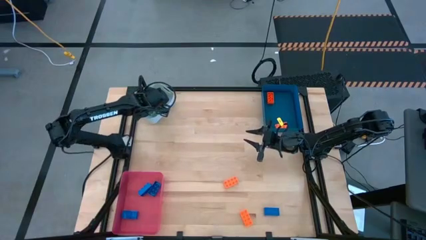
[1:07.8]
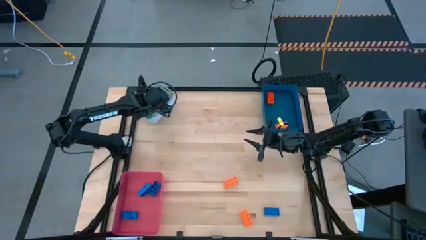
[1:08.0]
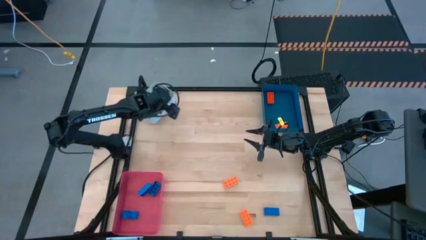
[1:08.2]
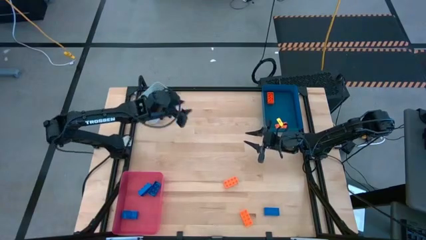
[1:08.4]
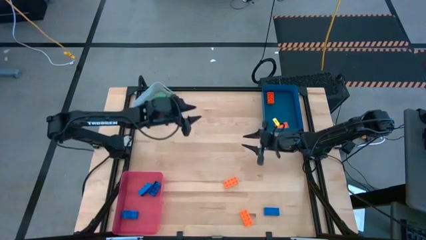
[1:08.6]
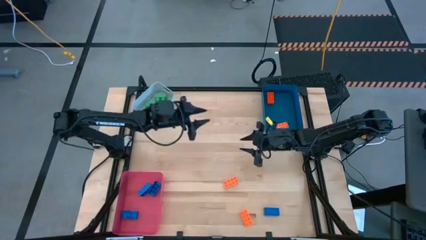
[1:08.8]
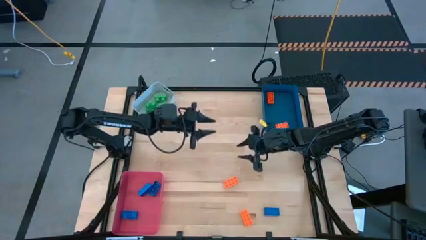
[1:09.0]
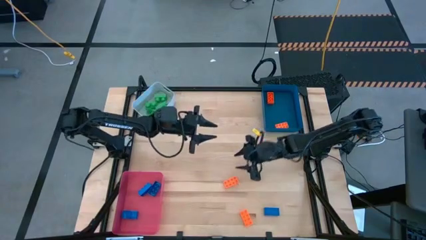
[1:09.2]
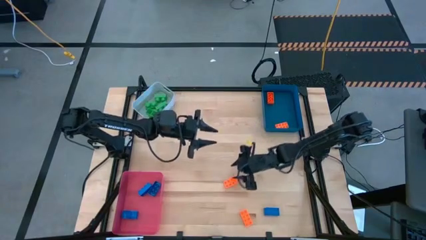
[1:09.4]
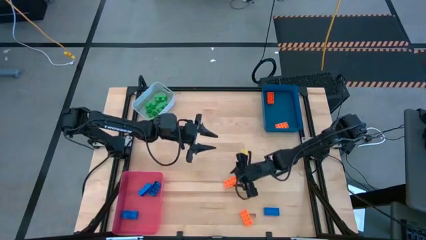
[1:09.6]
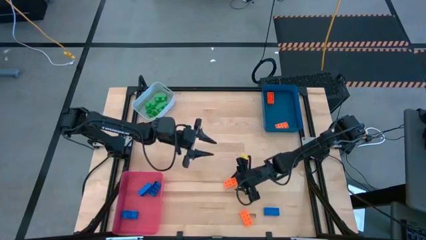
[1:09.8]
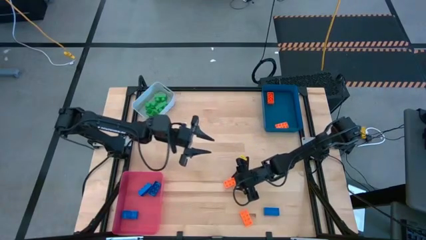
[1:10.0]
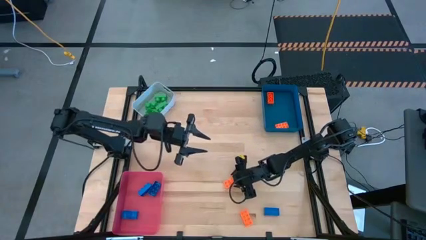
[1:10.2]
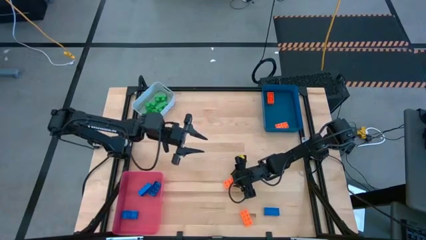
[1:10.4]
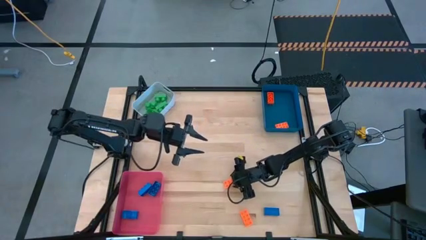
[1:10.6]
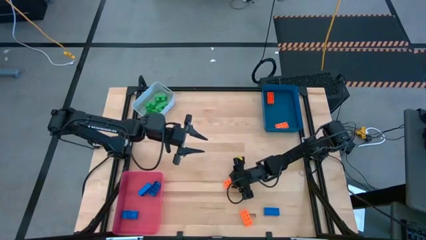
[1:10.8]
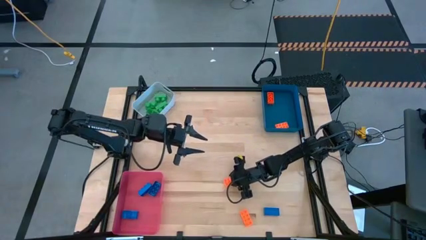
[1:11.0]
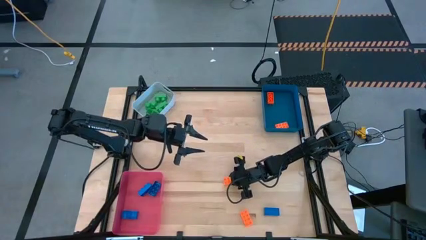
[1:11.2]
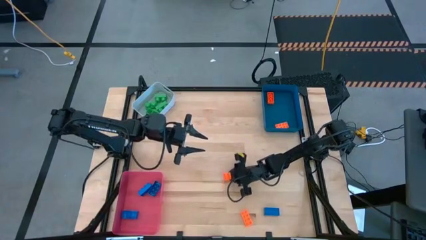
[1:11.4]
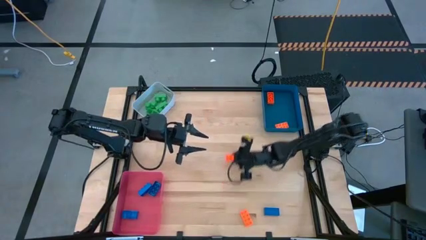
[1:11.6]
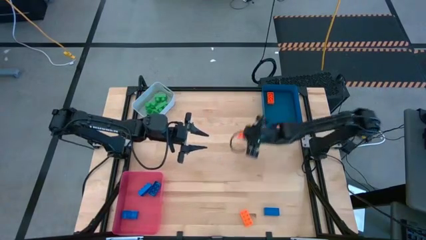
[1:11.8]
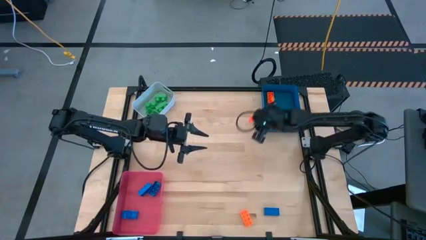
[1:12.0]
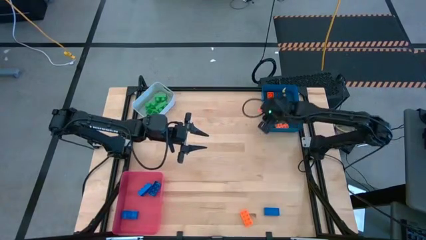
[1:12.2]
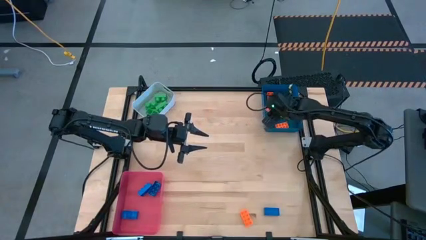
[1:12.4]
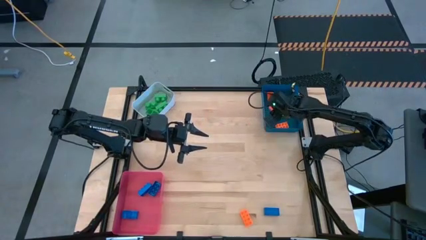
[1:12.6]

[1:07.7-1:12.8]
Task: Sort & place blocks by color
Put the orange game piece into the blue bin

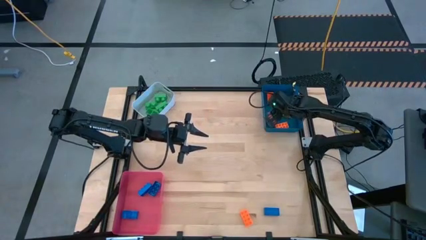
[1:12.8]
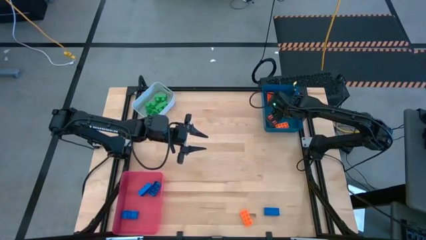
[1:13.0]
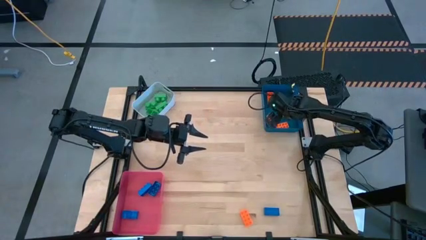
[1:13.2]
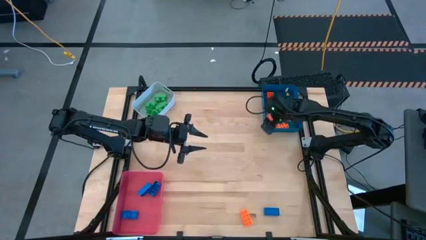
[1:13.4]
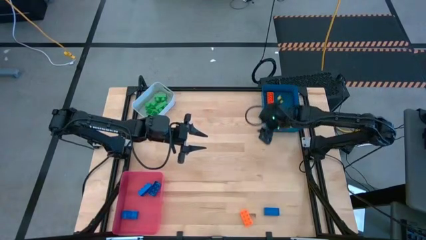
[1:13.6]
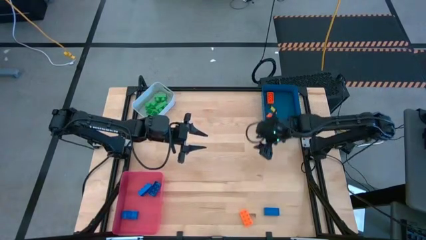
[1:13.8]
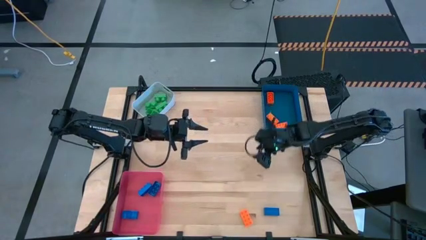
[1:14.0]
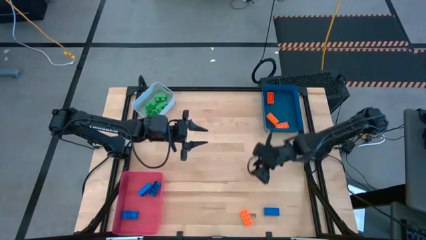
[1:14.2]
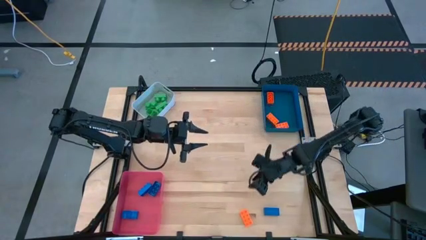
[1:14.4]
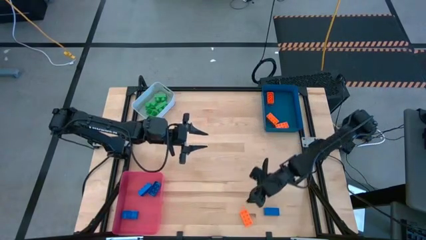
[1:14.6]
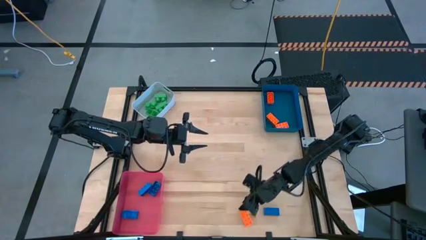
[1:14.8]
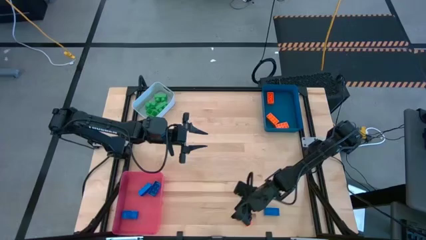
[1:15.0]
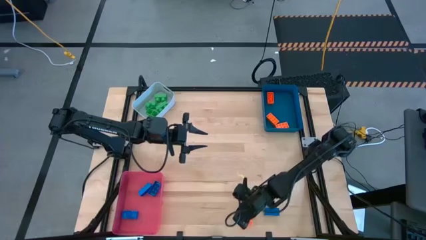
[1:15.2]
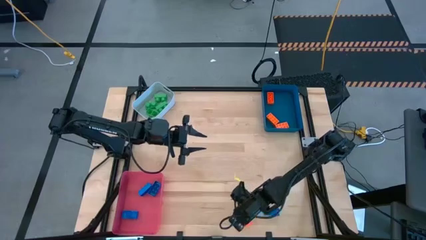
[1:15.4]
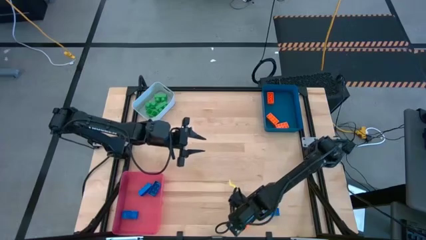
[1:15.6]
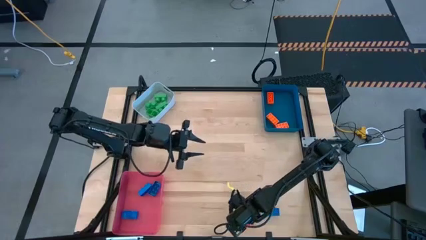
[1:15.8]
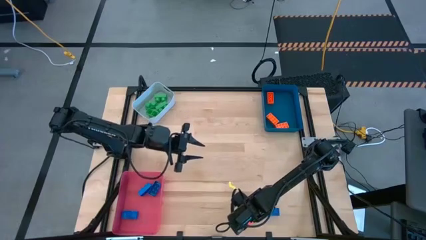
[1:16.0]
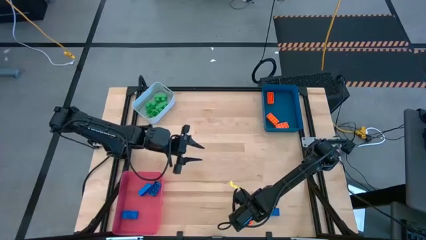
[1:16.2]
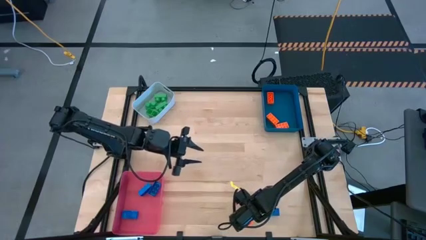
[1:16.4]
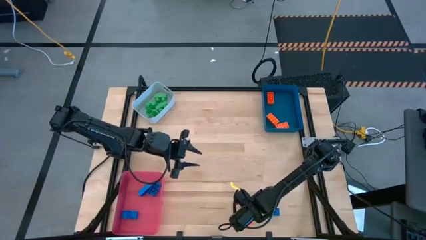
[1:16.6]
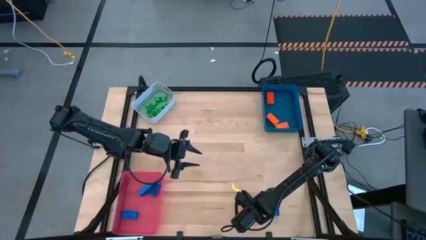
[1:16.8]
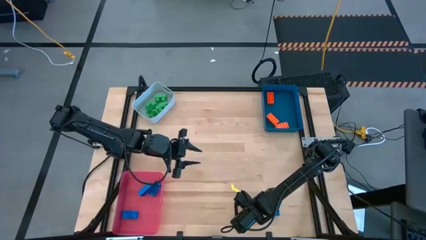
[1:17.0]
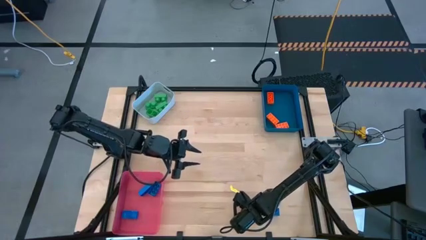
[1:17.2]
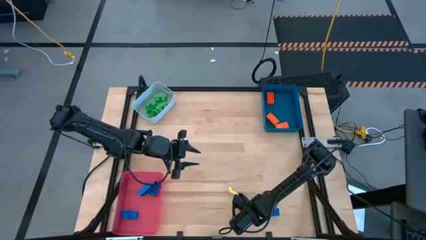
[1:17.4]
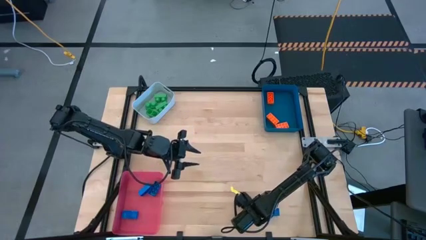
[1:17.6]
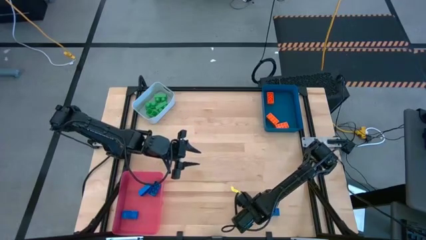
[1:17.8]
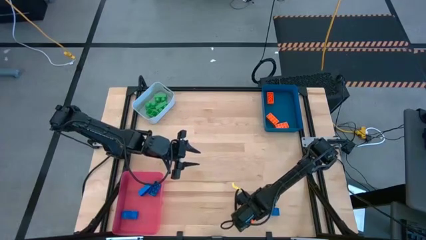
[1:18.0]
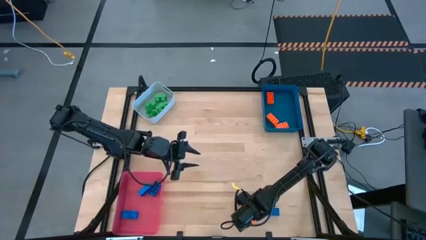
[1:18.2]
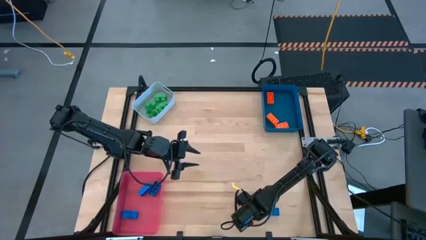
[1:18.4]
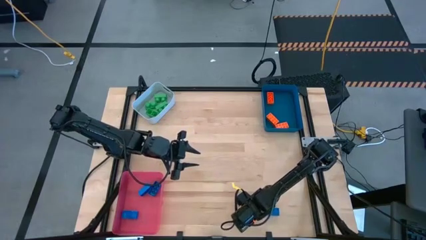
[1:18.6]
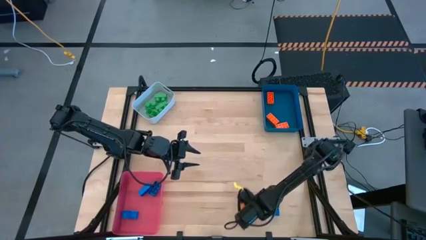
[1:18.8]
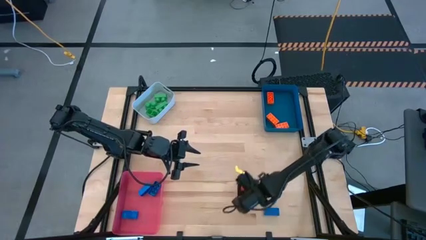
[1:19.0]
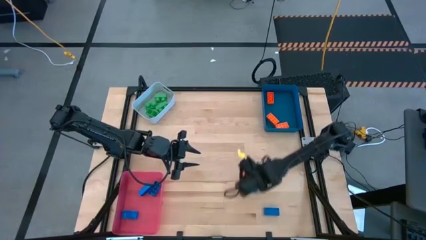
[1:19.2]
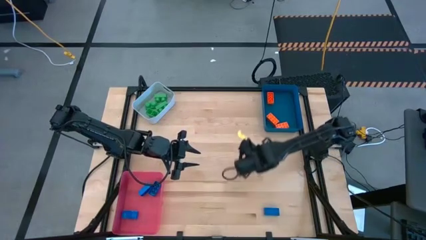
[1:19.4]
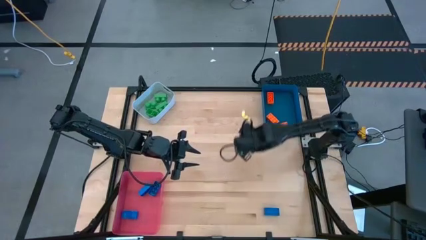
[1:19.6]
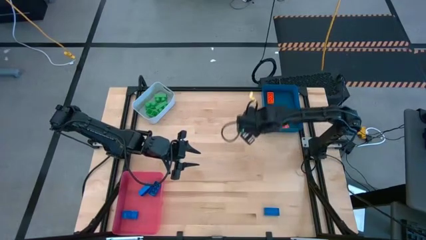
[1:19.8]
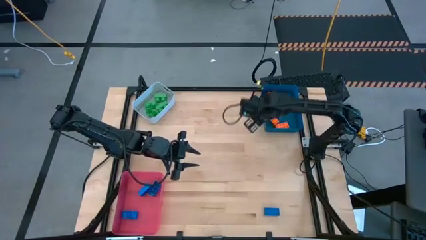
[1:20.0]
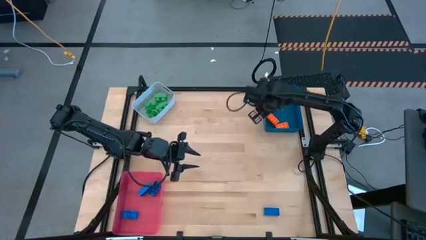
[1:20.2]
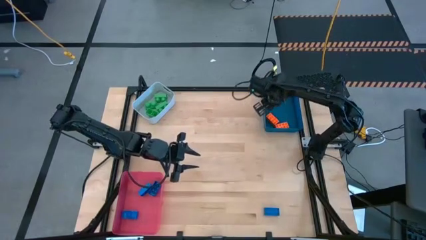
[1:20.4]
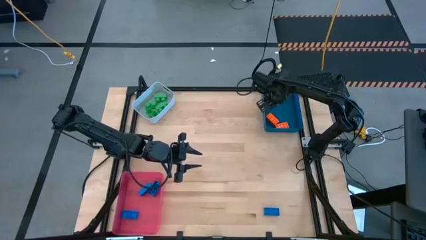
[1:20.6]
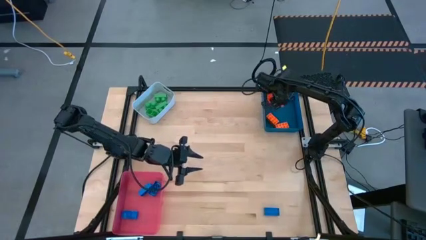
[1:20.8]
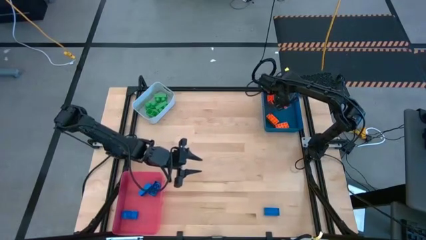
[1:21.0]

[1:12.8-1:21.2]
Put the orange game piece into the blue bin

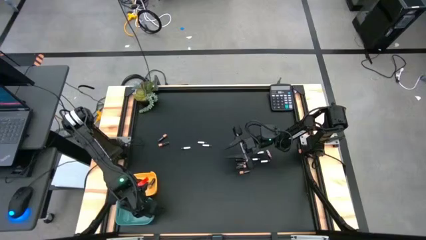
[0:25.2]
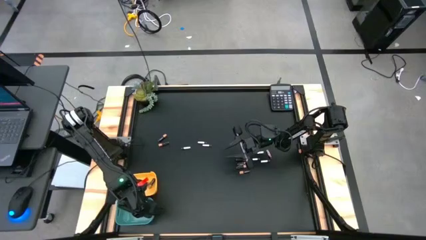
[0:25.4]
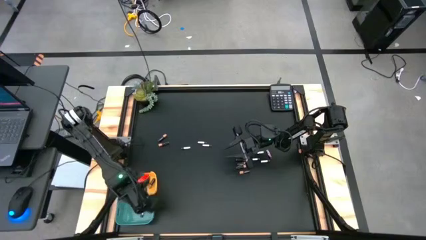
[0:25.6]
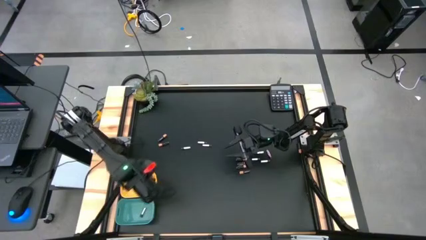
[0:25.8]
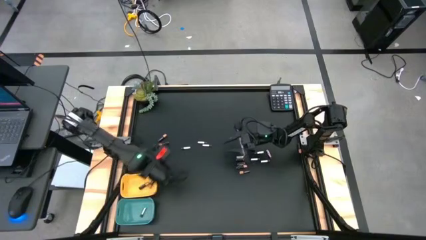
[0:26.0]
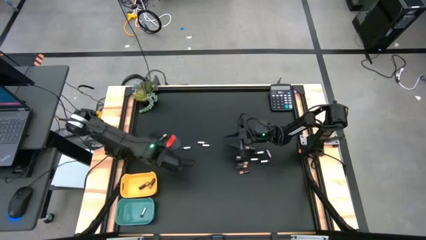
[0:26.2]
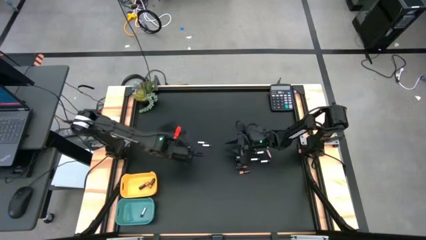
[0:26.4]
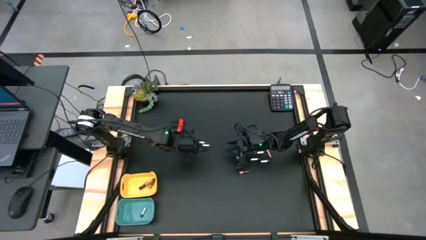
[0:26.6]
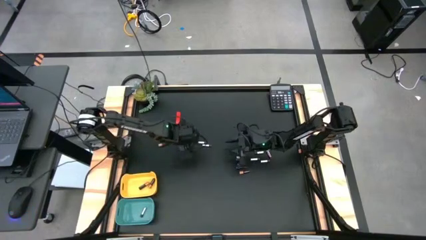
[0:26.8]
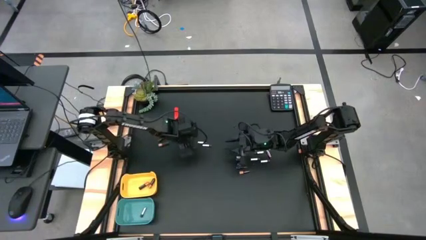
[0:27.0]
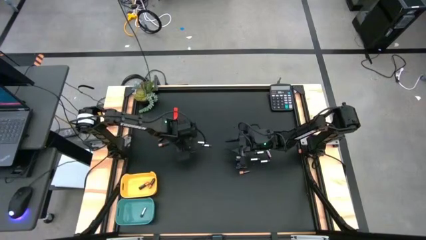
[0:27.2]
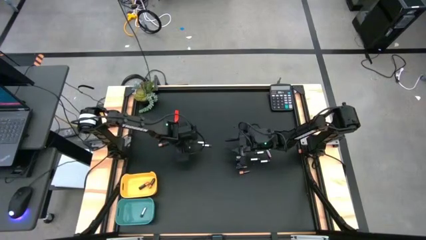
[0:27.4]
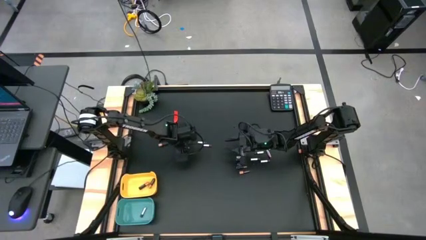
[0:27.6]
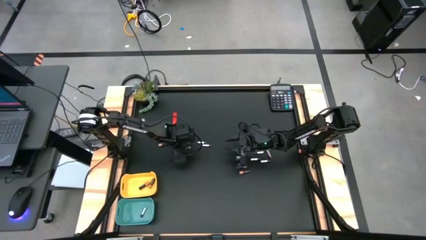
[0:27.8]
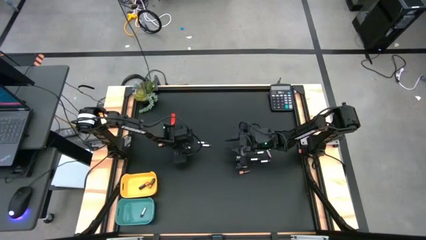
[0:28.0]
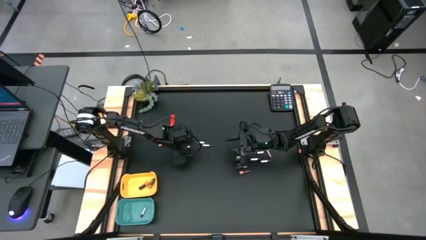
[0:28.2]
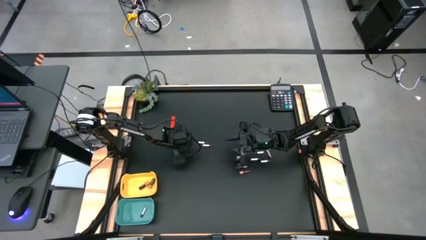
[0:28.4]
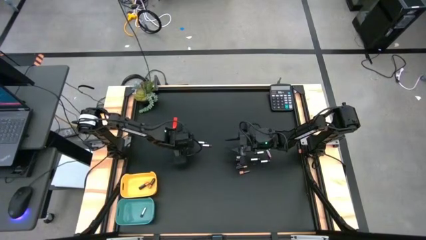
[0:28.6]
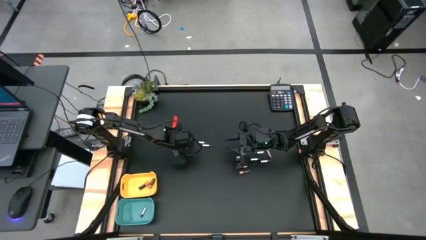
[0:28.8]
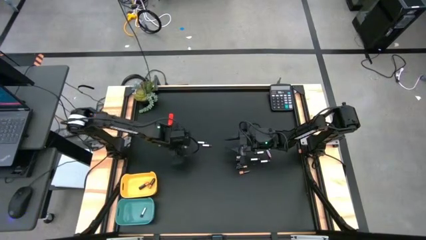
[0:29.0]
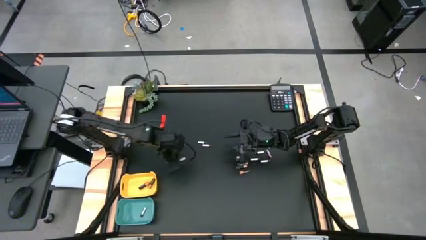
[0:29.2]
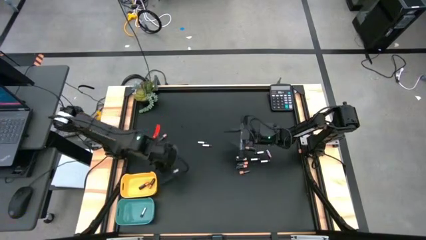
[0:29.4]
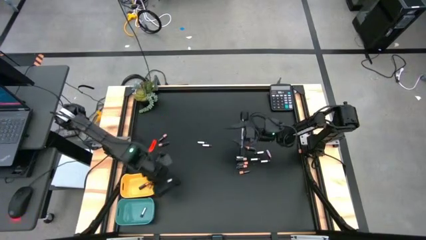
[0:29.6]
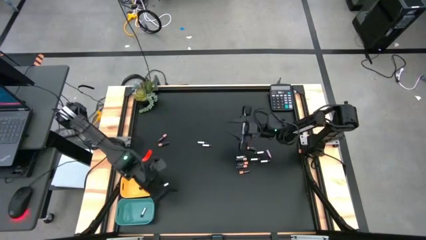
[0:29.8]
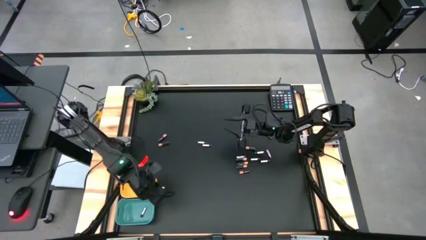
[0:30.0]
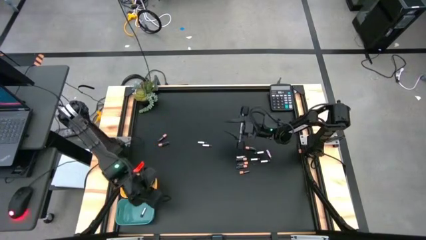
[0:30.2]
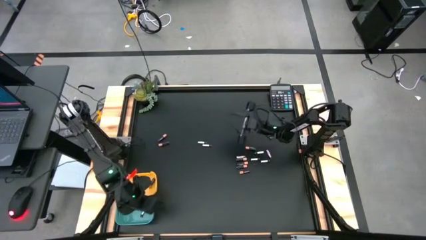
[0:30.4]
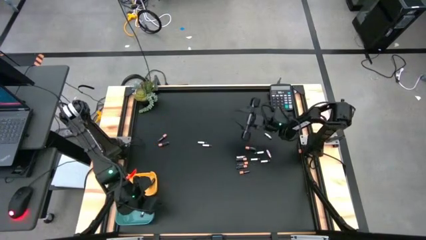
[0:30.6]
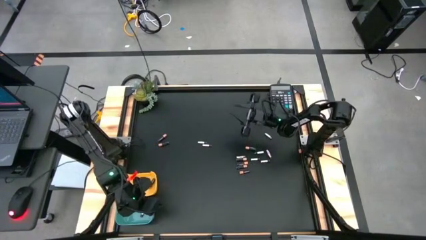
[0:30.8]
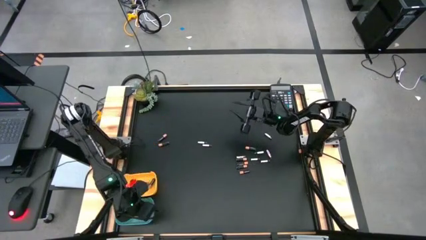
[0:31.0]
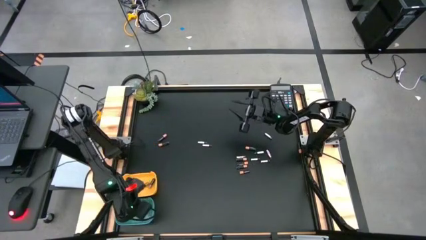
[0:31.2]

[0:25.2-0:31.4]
Task: Sort batteries
Put the silver battery into the green bin
